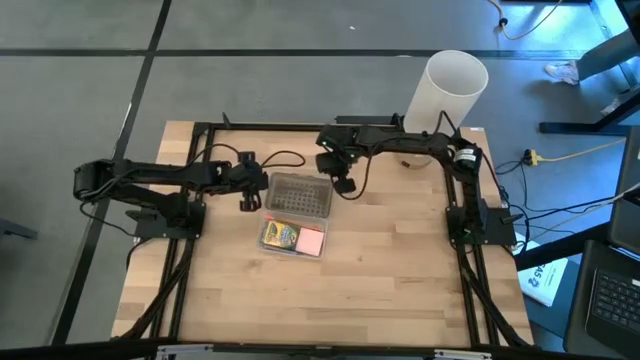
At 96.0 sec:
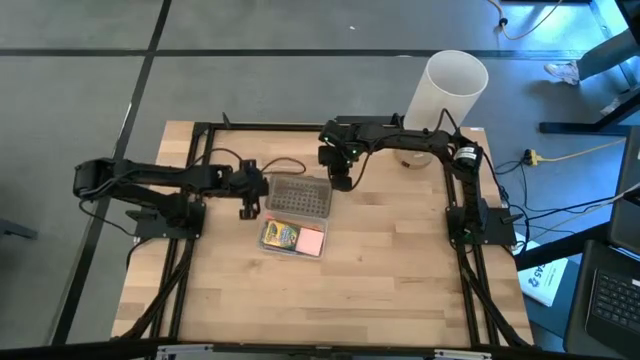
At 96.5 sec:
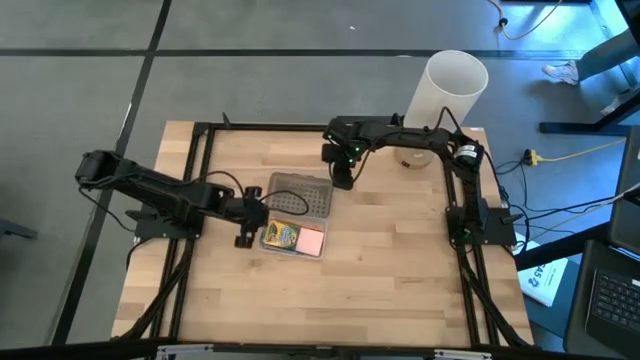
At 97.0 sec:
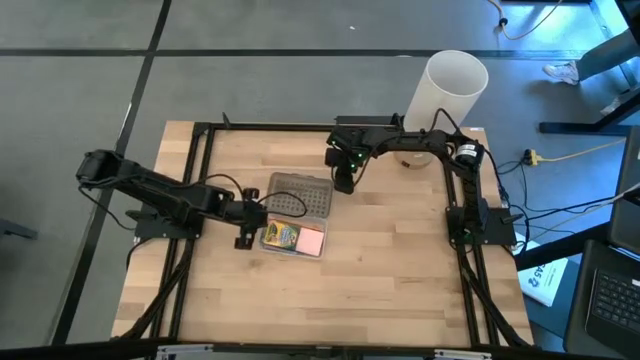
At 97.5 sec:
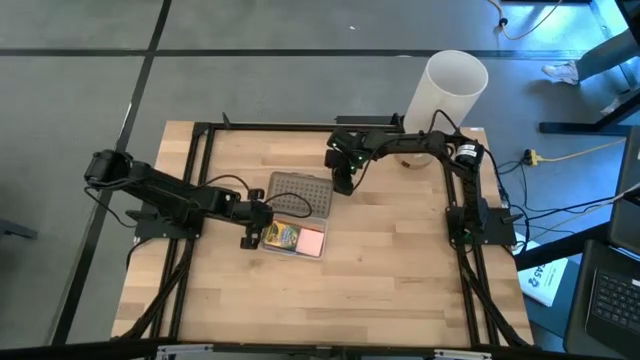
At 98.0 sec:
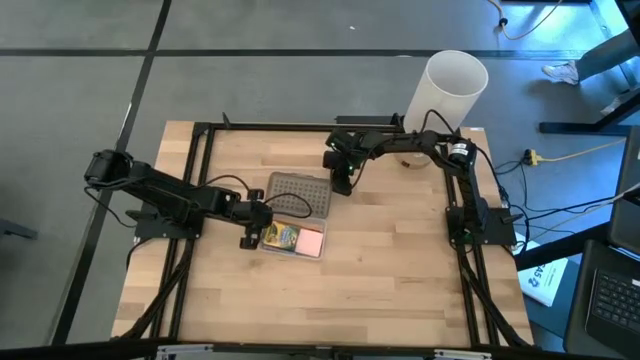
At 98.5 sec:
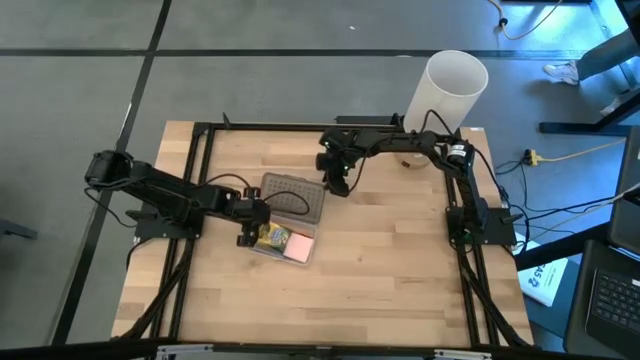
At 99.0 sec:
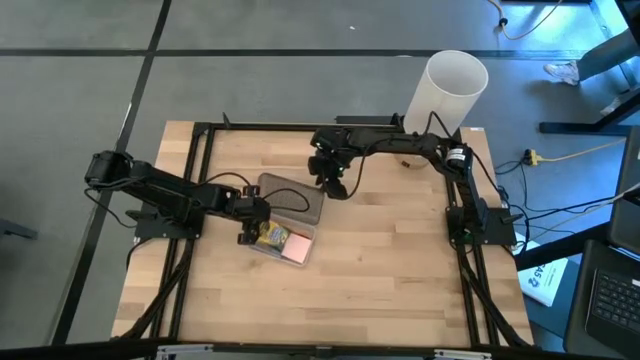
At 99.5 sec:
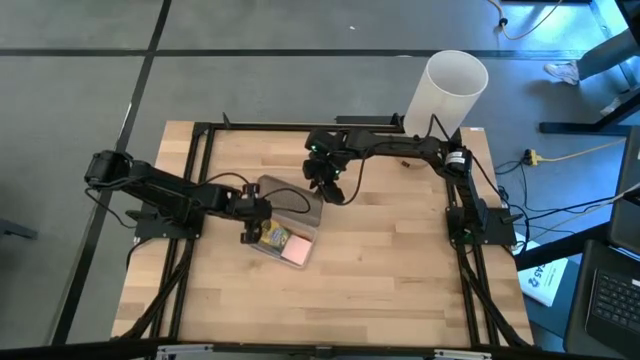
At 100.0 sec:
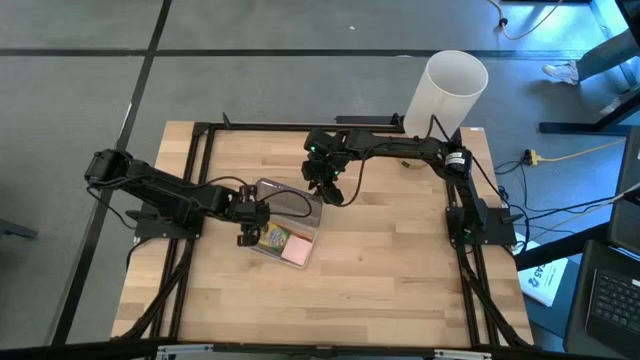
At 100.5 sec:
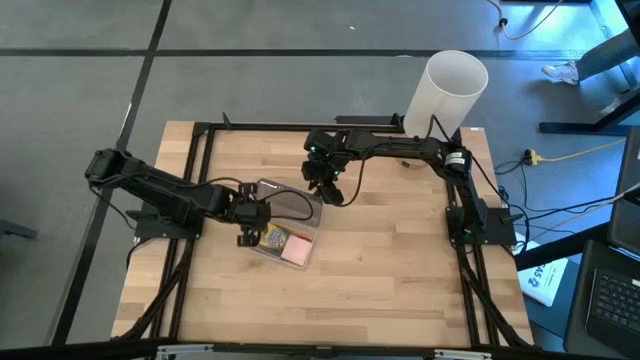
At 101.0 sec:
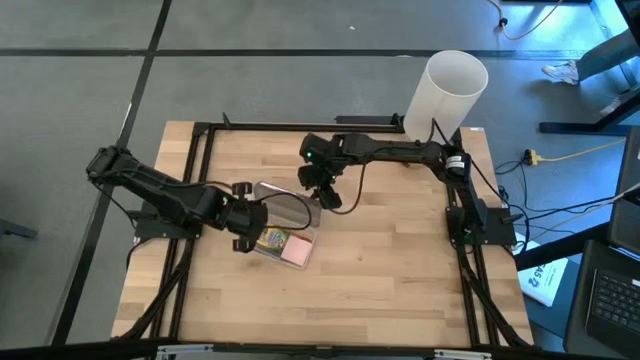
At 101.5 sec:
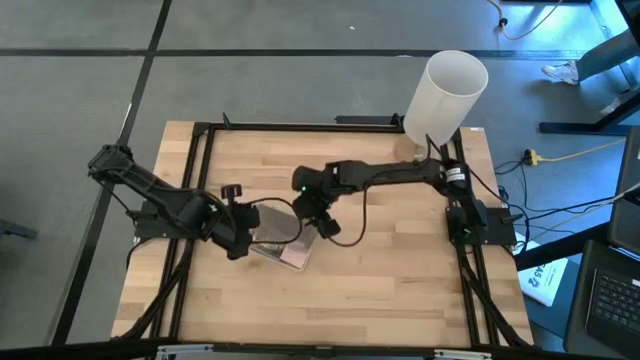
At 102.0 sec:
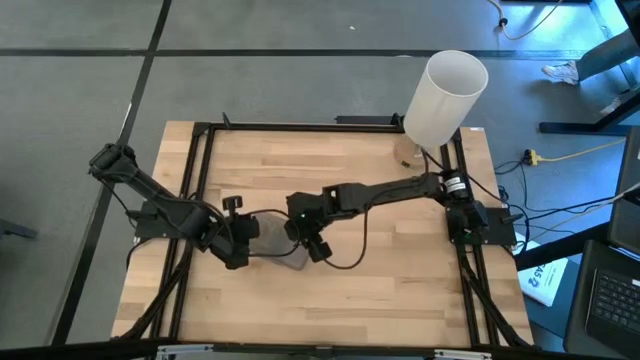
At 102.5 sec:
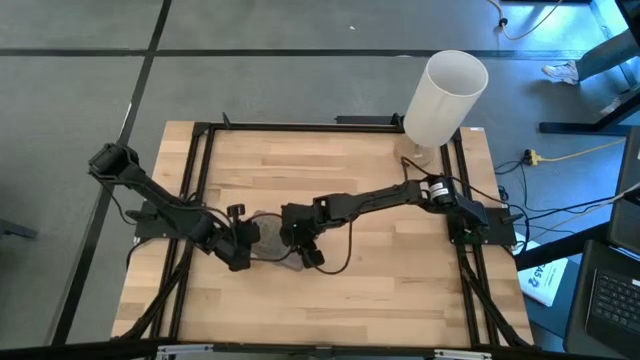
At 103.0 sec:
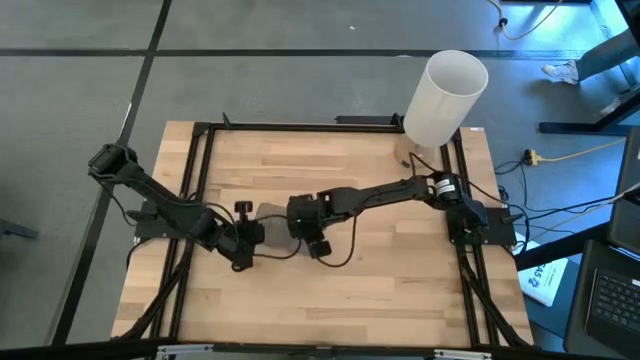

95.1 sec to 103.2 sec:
Task: Pack school essentials
Close the black supply box

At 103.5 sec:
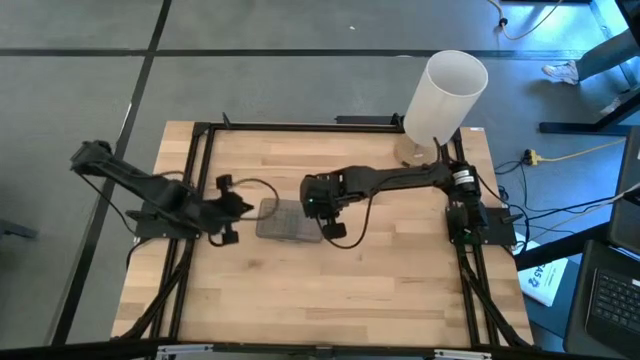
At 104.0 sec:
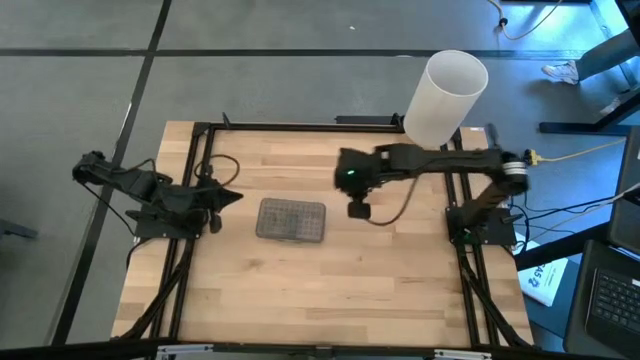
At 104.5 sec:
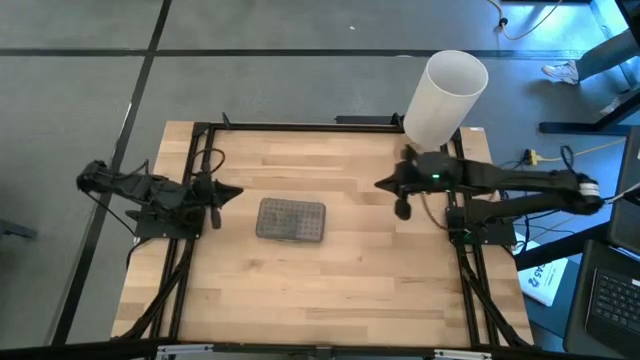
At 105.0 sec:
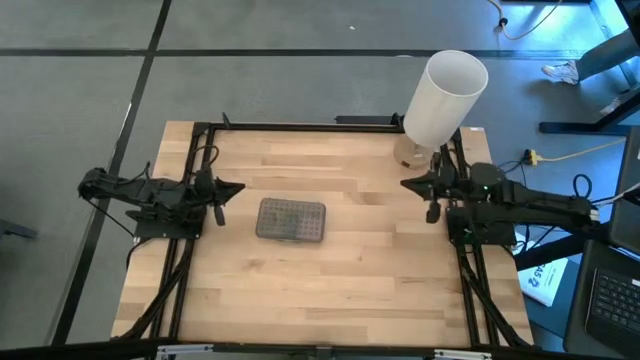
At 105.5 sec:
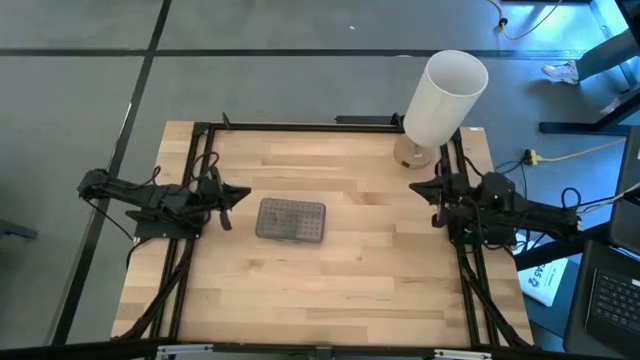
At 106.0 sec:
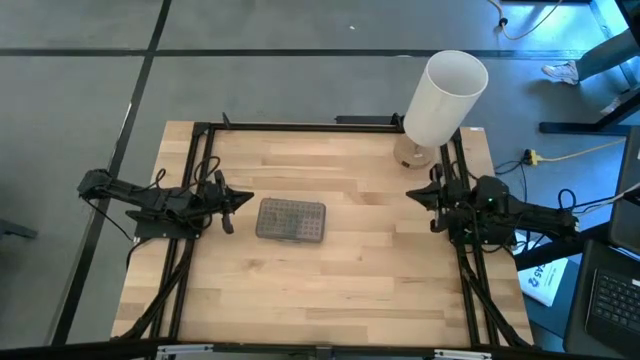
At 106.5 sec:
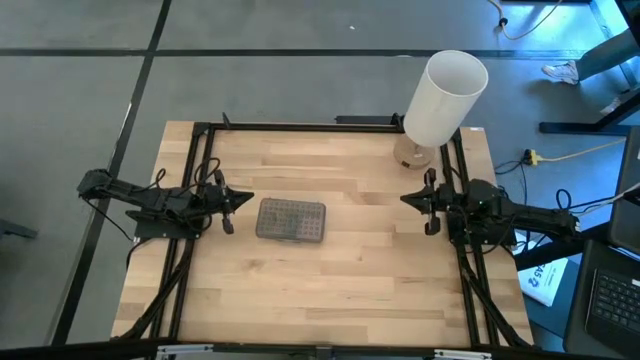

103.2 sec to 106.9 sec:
Return to Home Position

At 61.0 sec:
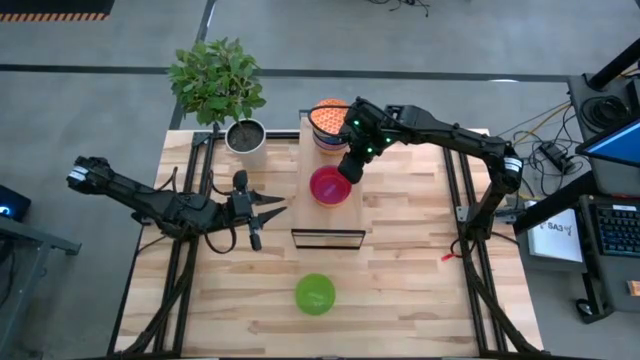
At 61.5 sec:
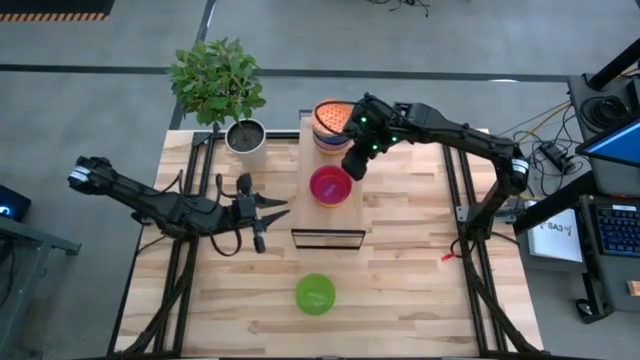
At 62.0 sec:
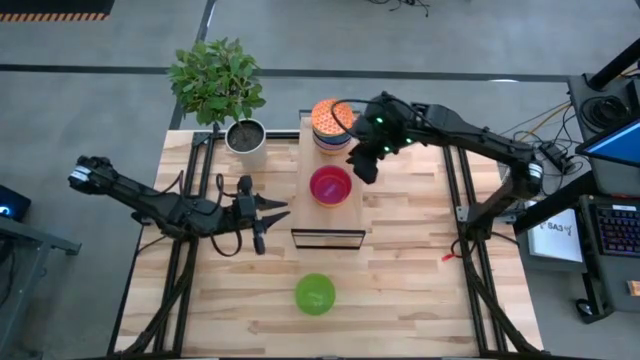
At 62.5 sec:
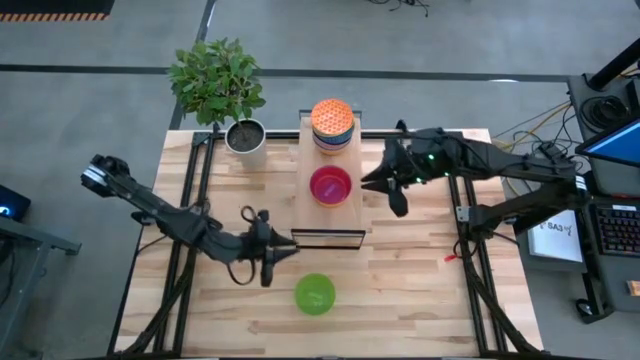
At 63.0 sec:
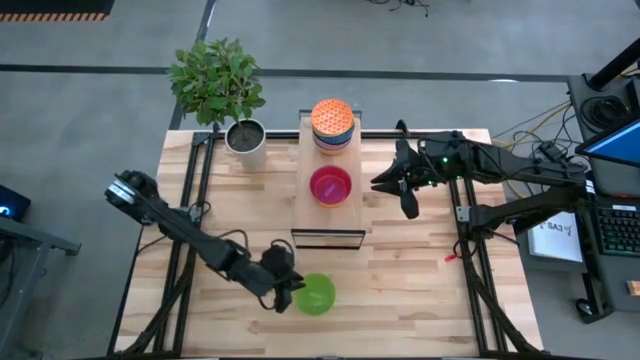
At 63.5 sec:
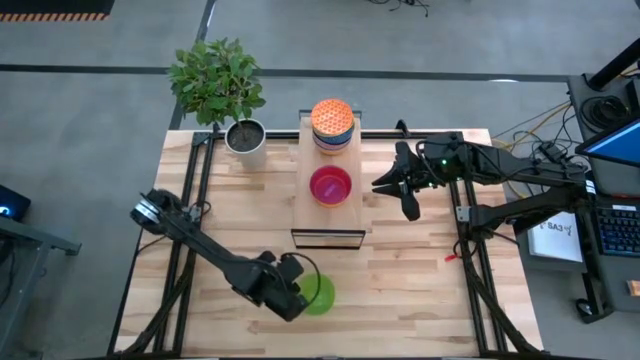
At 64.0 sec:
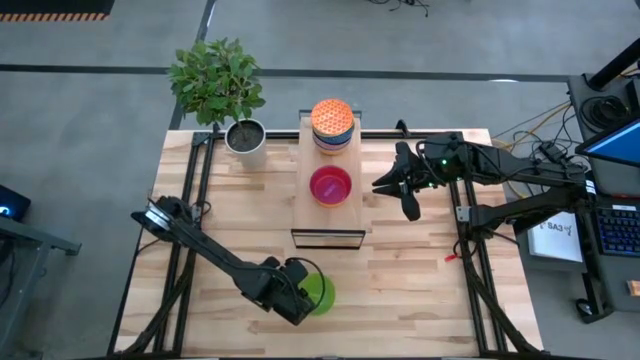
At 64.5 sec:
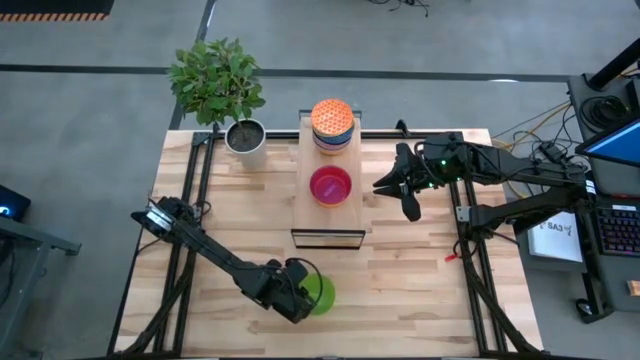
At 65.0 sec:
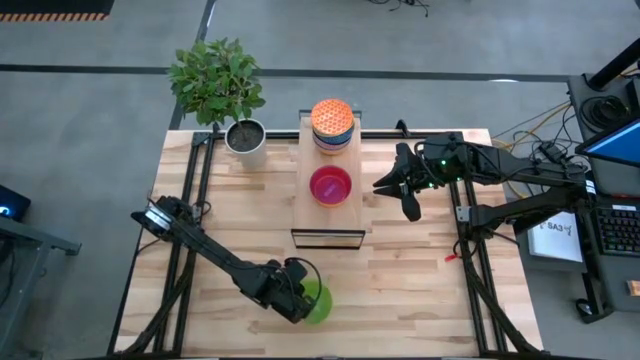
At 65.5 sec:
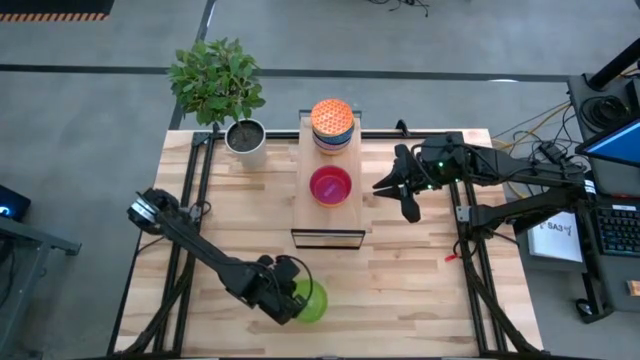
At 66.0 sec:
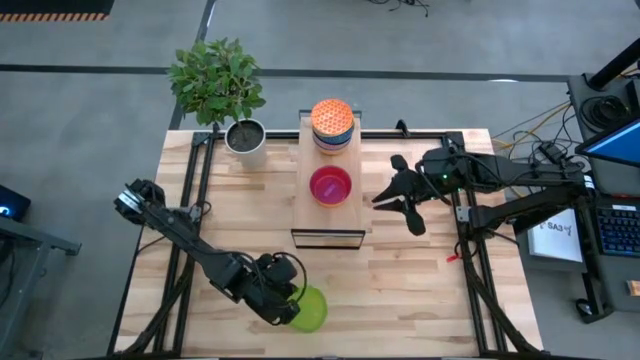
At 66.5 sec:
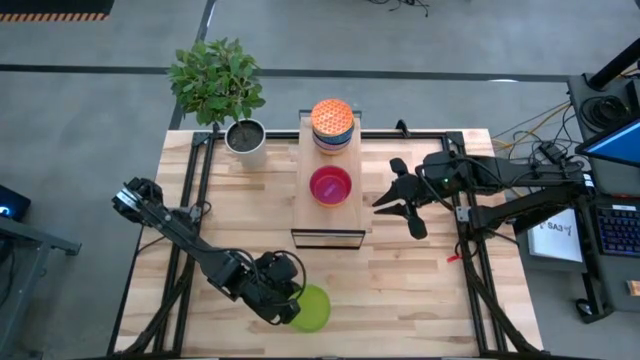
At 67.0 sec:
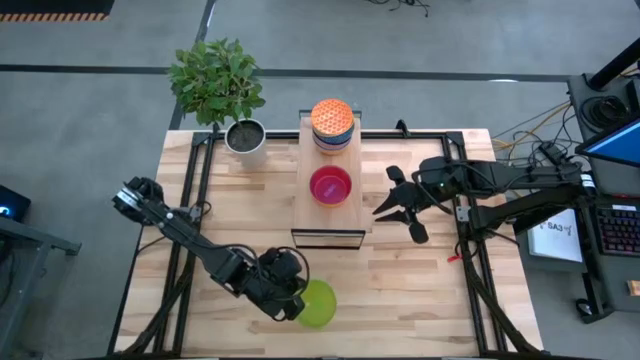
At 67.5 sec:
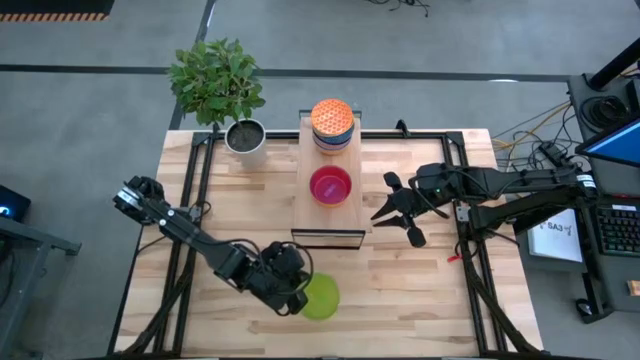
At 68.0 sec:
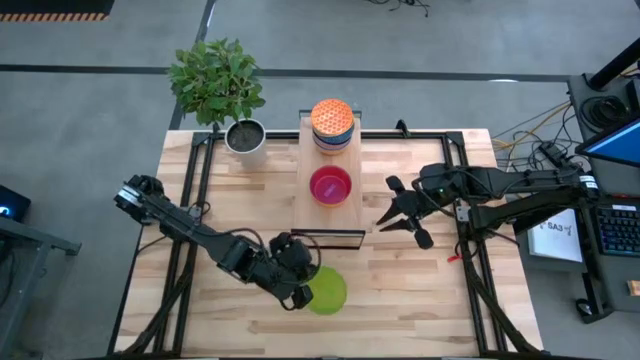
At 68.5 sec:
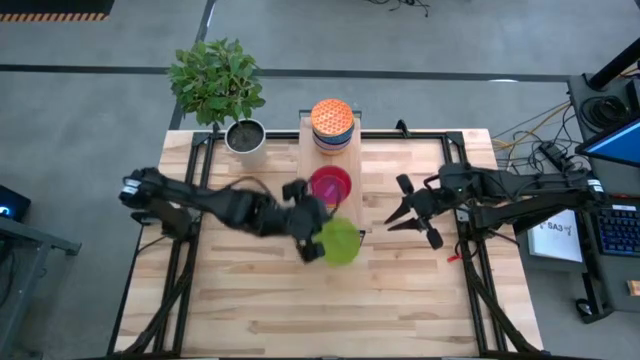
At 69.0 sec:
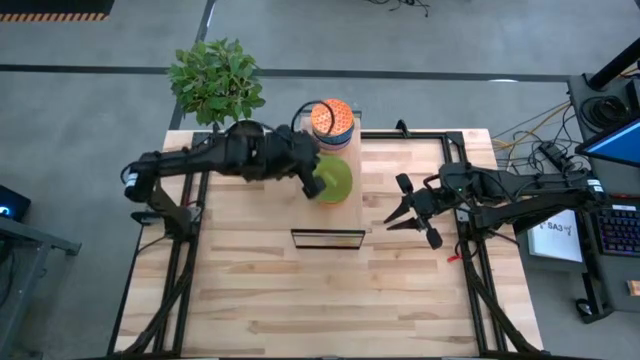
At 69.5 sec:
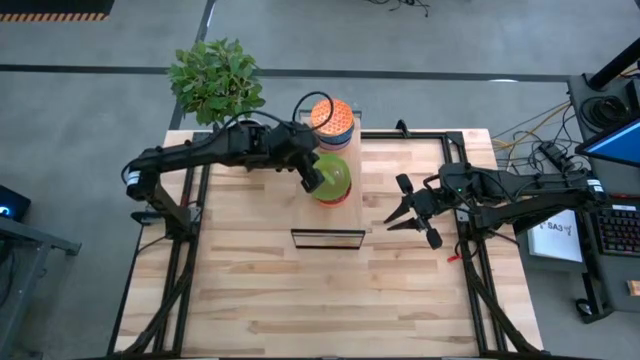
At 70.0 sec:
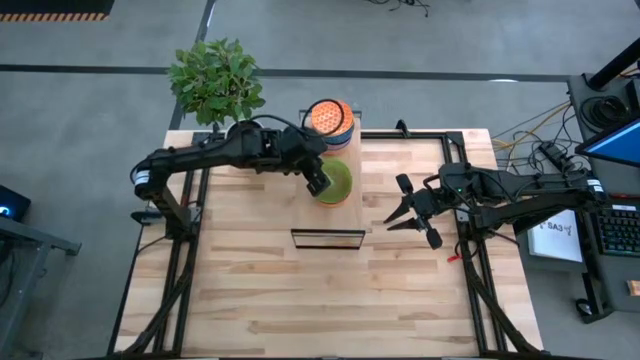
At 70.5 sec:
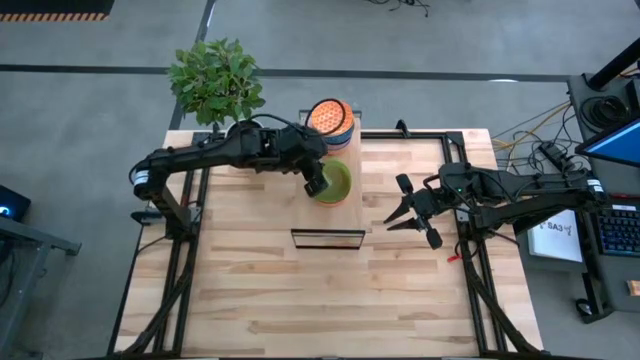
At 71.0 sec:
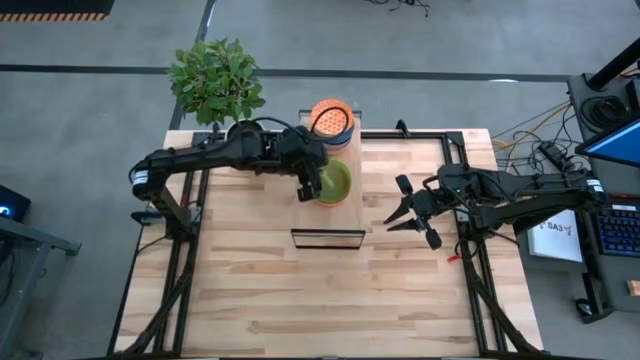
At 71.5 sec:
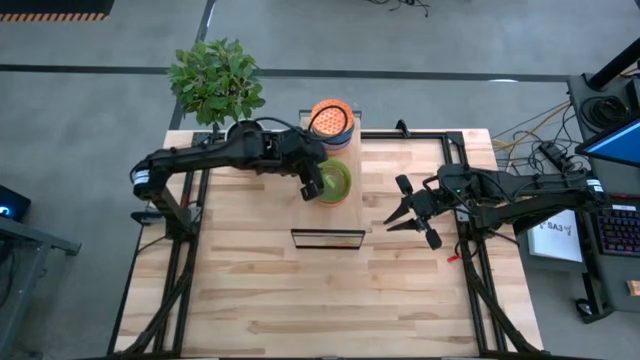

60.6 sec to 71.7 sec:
Task: Place and stack bowls onto a shelf
Stack the green bowl on top of the violet bowl on the shelf
